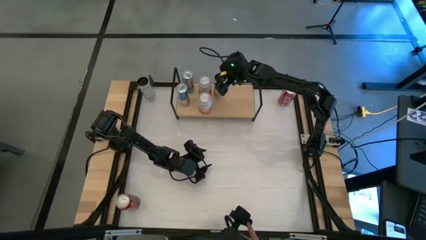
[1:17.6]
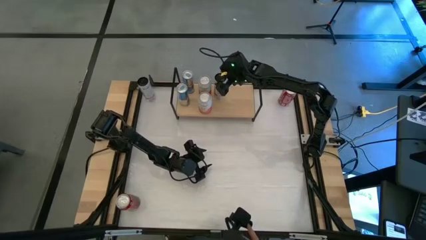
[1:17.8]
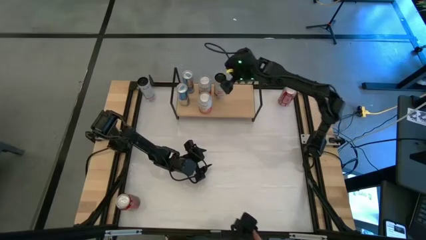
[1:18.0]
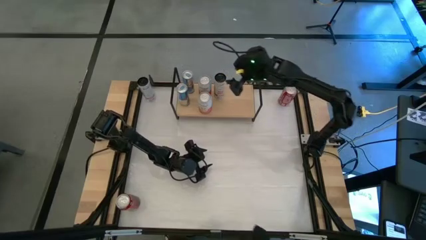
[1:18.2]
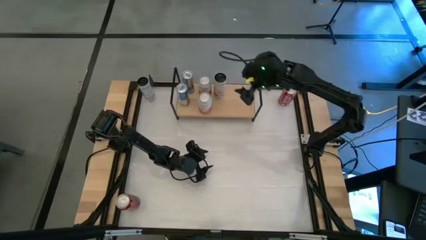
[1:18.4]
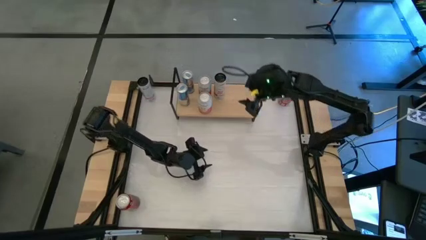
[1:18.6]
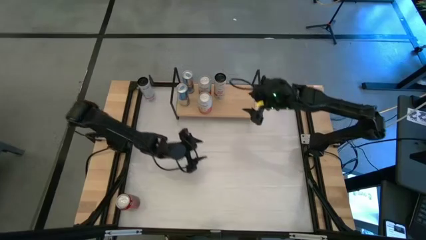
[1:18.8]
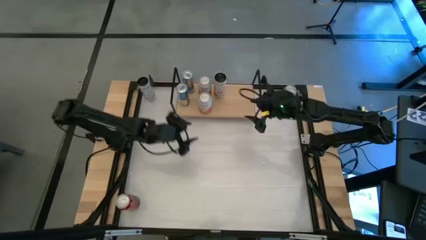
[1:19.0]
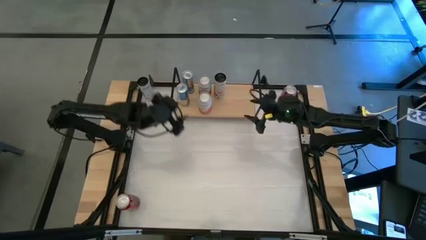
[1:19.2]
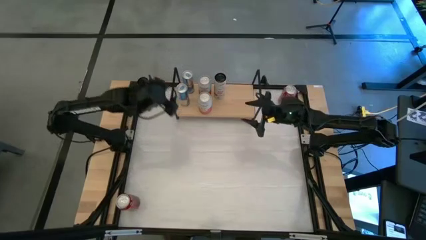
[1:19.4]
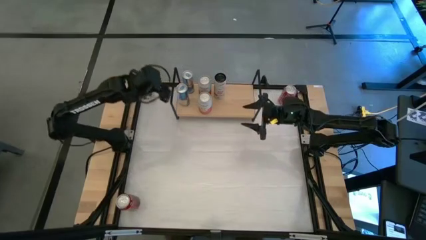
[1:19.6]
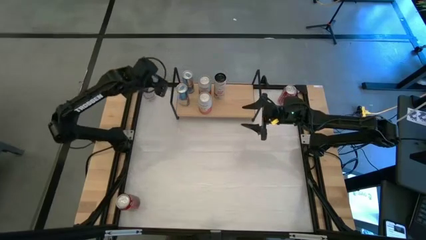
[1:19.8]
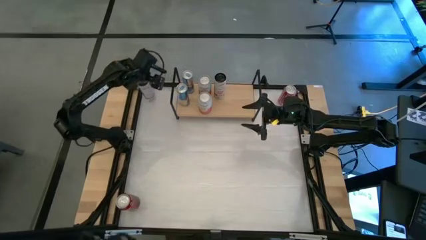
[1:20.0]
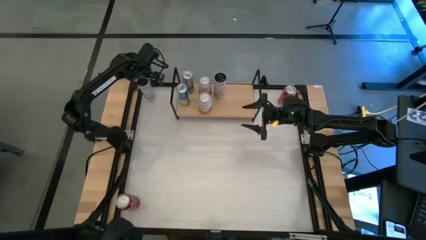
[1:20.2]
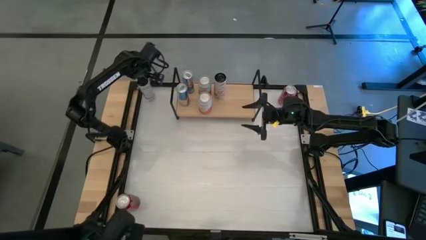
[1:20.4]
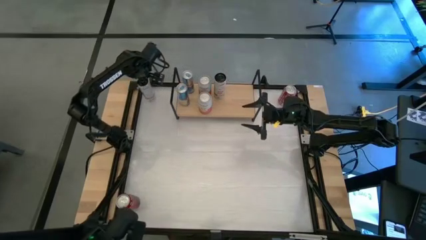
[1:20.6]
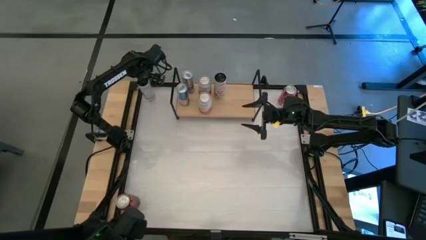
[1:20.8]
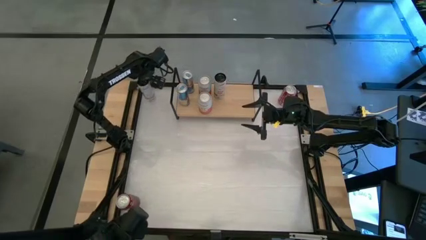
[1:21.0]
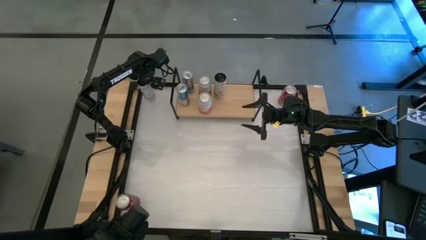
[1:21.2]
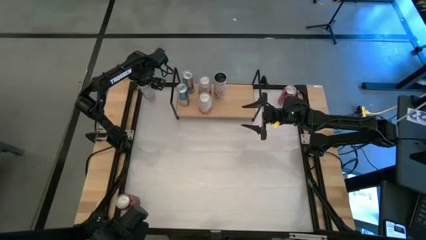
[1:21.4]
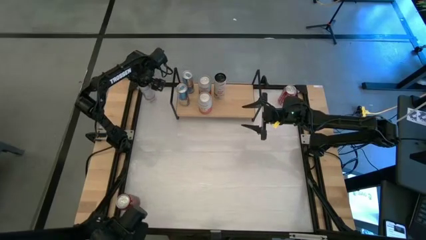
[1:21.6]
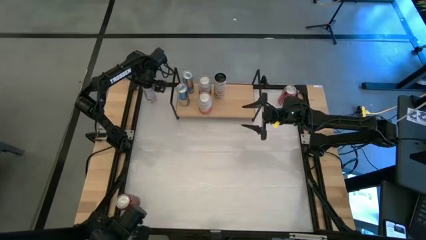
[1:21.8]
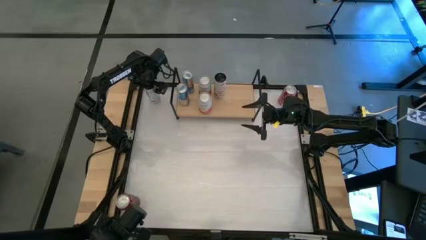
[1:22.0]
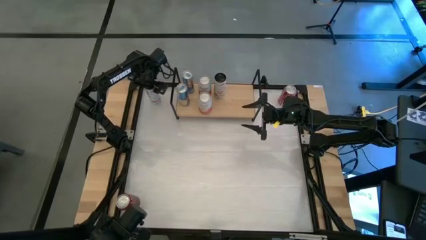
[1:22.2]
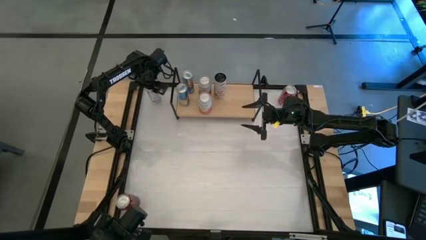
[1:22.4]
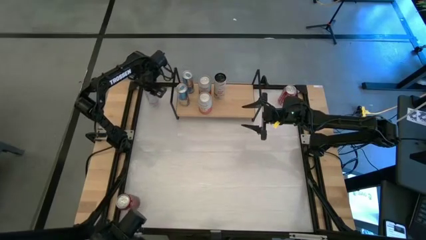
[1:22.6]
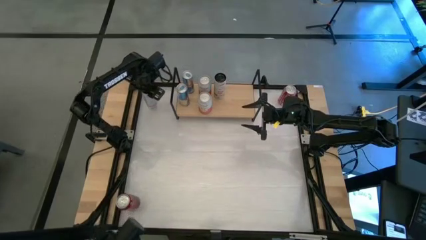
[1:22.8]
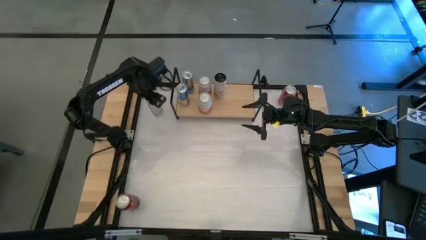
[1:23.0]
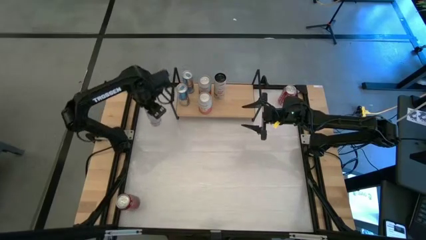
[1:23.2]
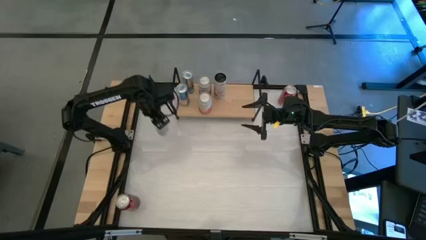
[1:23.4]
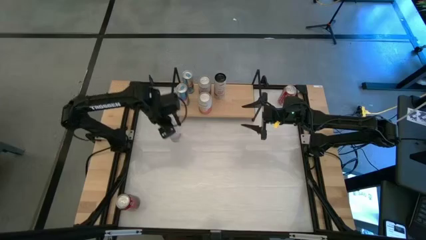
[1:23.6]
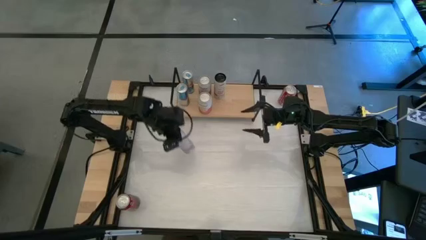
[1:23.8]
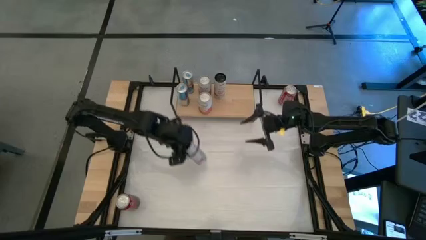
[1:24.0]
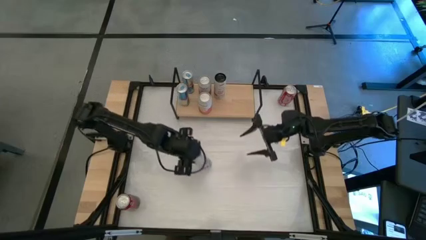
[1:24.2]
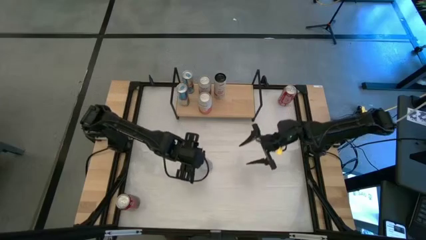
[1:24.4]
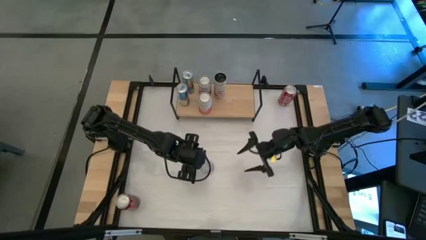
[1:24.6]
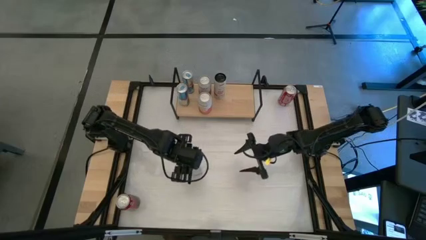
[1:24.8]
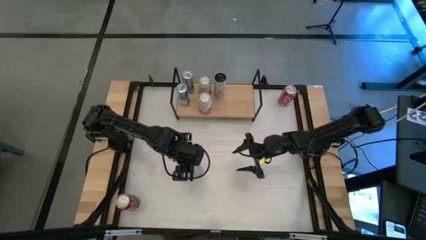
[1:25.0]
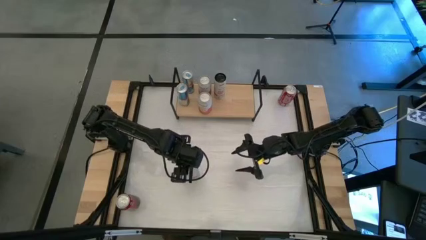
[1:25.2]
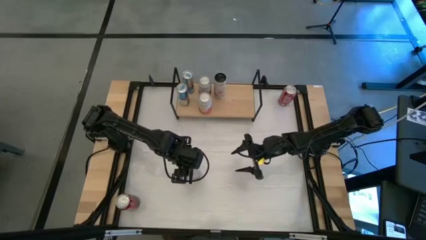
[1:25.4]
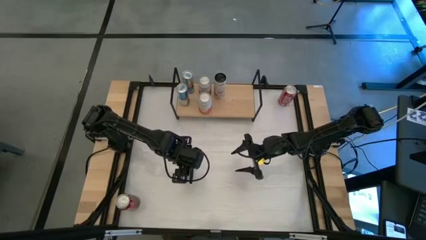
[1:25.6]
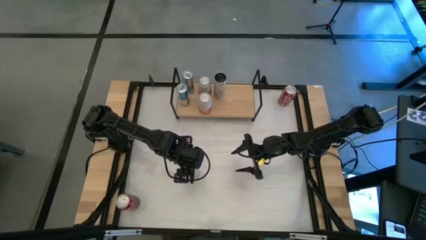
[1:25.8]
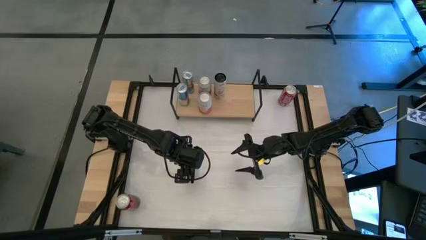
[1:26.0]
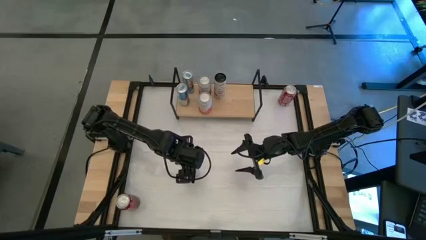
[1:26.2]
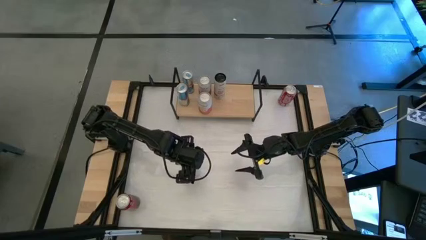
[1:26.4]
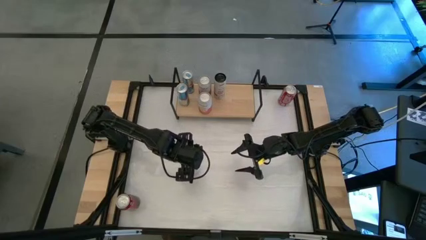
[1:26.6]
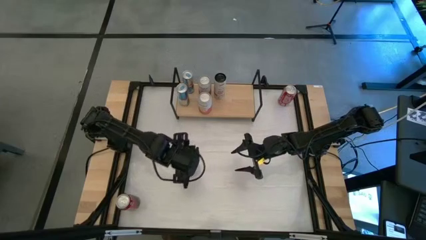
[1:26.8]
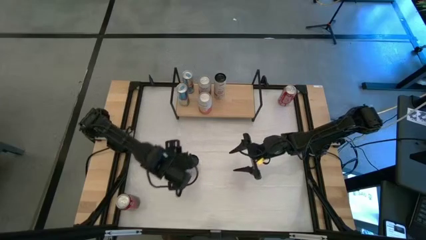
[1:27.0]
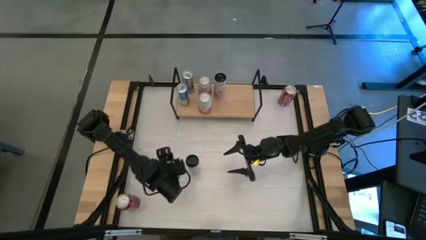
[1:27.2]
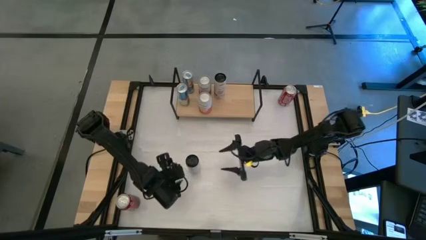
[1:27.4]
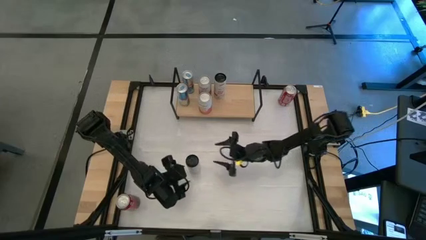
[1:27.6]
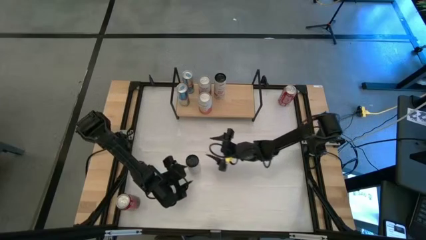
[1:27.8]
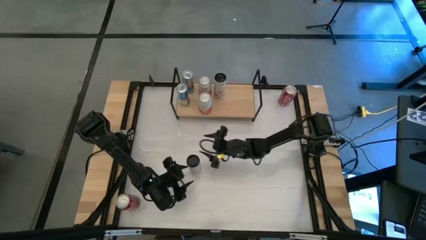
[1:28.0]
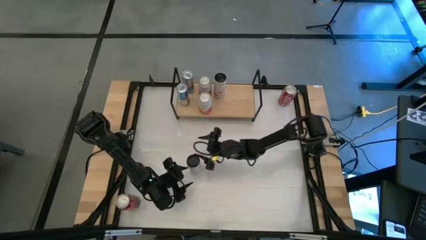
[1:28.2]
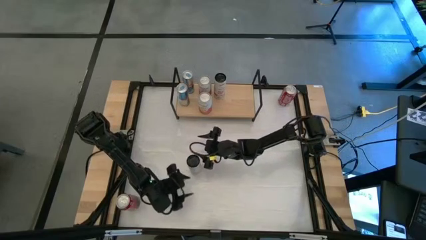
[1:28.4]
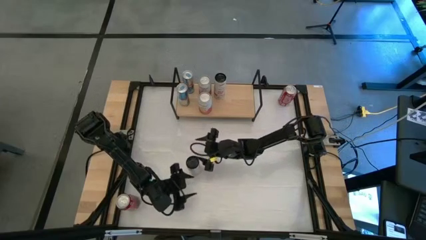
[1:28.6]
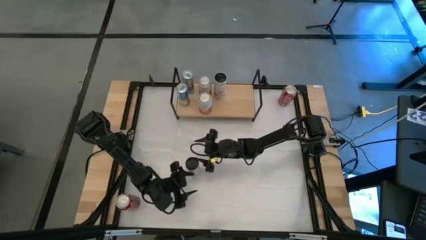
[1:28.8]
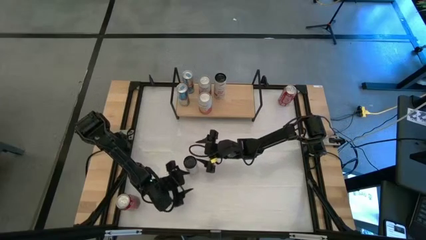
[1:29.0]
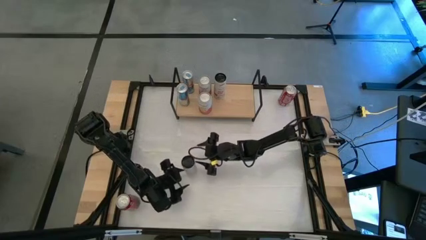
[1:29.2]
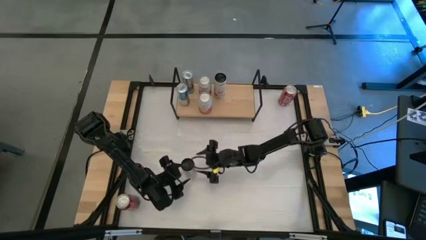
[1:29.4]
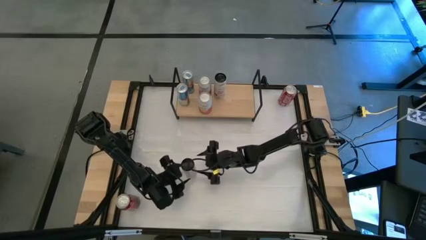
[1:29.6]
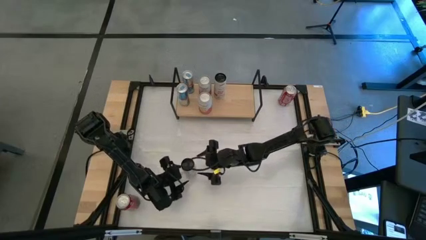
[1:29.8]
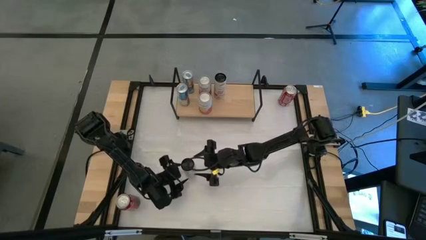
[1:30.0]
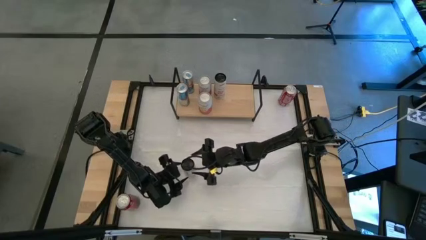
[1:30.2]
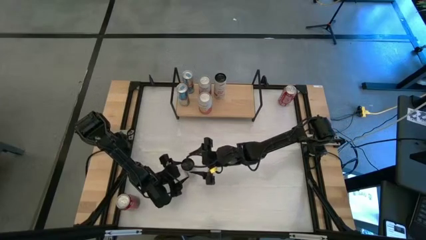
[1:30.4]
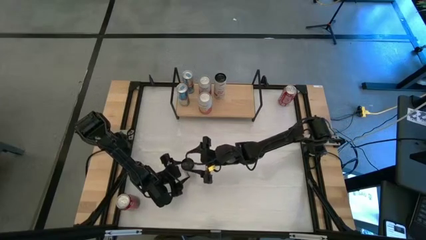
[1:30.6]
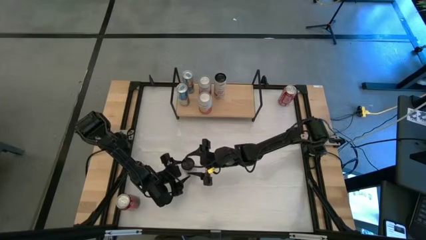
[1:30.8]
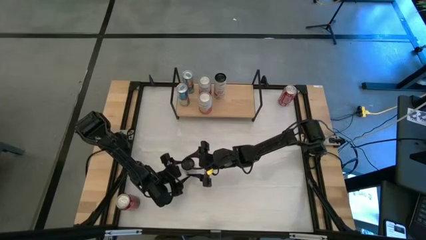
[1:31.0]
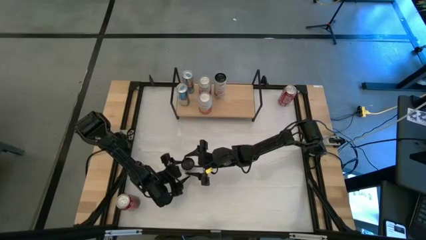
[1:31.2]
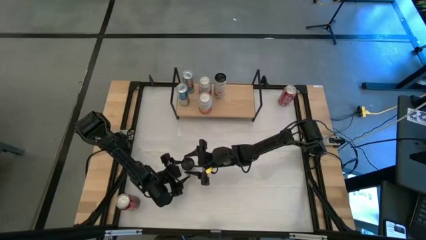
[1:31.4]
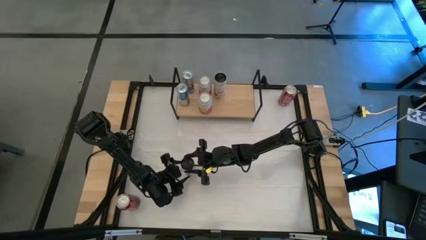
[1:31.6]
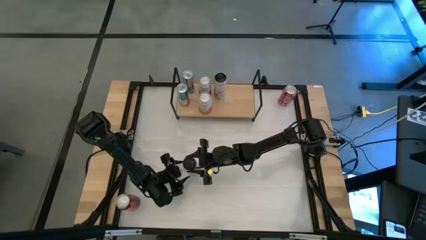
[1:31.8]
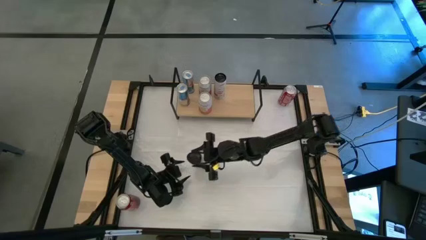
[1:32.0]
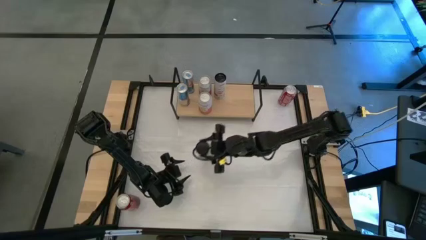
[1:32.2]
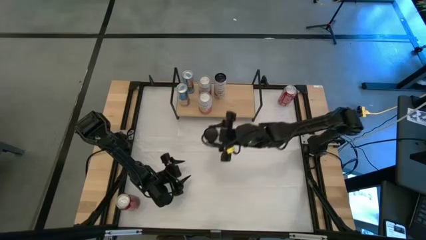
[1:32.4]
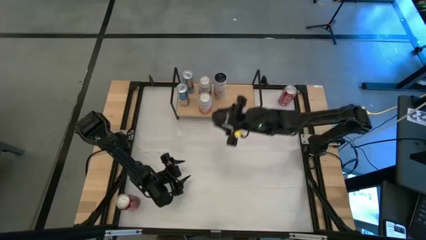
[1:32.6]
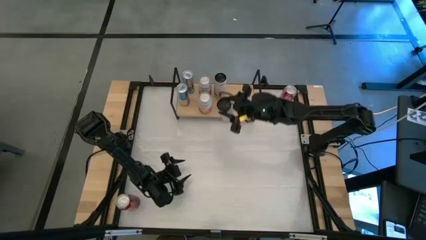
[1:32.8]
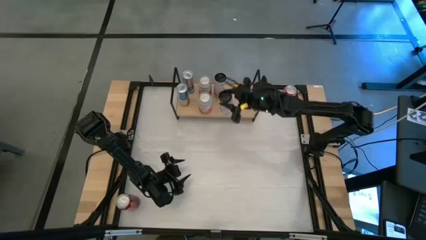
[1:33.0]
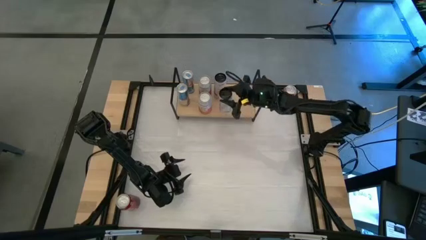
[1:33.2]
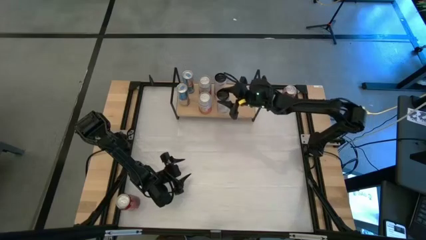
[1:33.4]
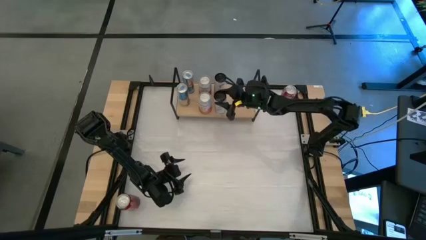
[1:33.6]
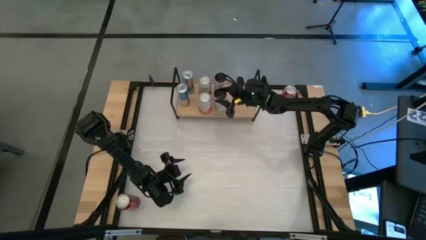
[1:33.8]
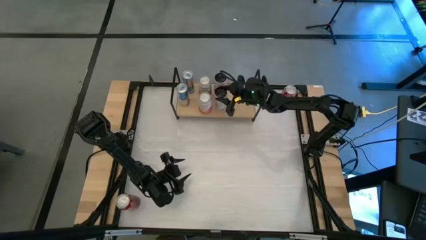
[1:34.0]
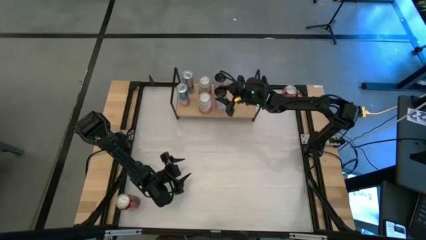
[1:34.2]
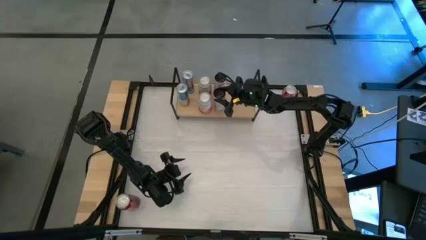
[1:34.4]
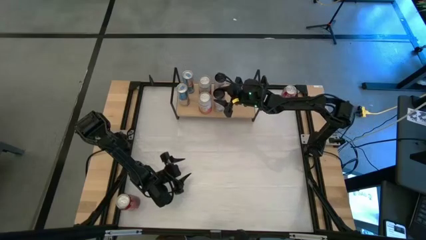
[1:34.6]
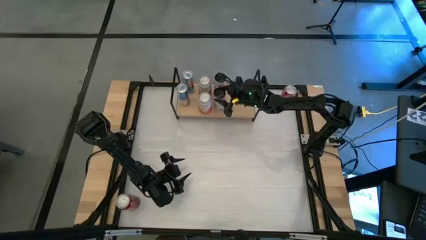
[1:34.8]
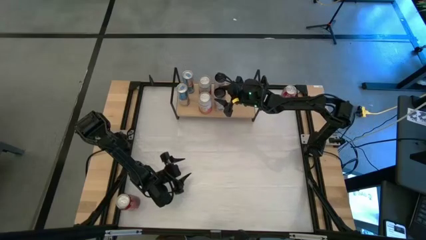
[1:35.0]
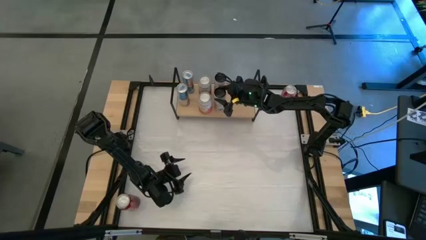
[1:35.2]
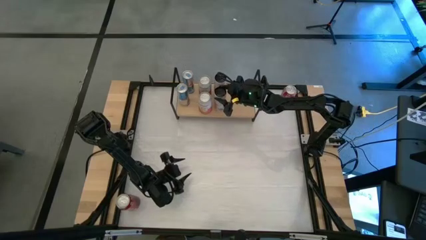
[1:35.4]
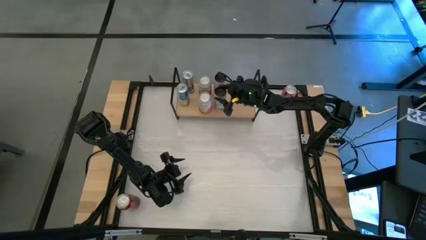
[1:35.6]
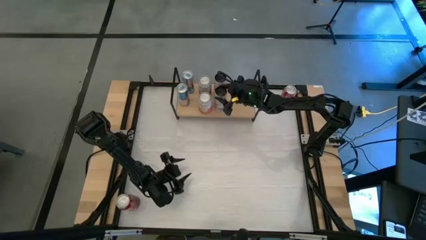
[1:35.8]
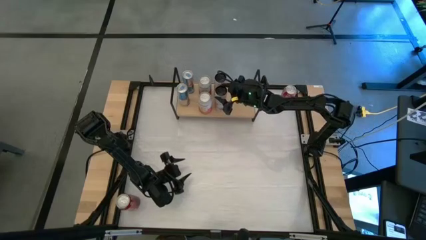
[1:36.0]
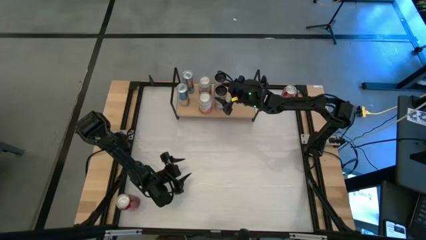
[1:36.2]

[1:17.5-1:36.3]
Task: Place canned beverage on shelf
Put the white and pink soda can aligned with the other white pink soda can on the shelf
